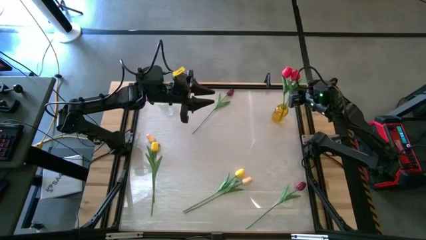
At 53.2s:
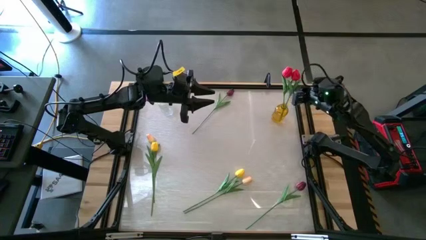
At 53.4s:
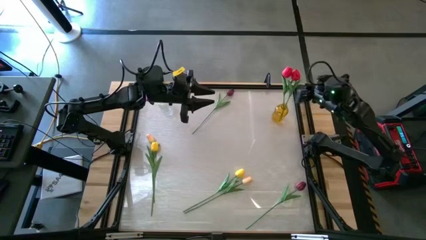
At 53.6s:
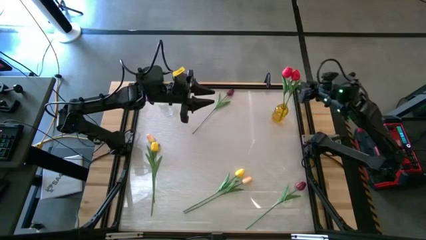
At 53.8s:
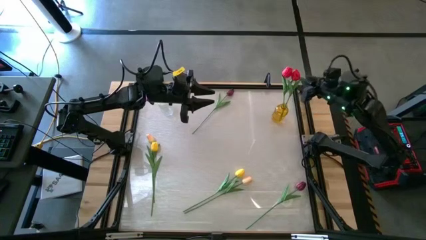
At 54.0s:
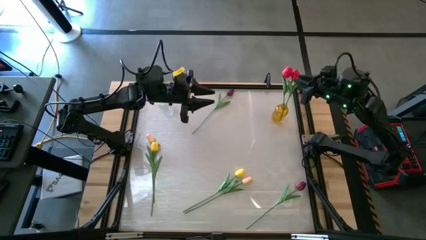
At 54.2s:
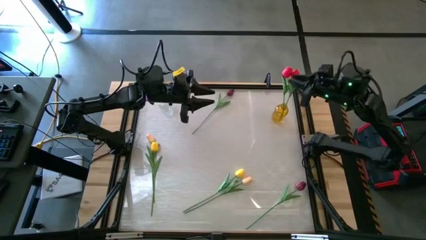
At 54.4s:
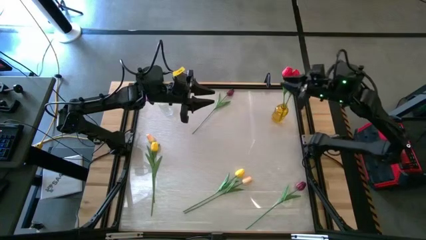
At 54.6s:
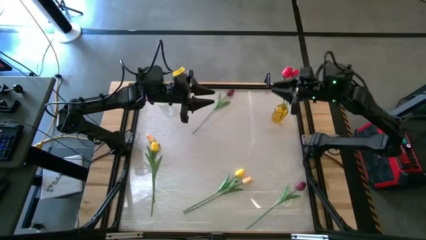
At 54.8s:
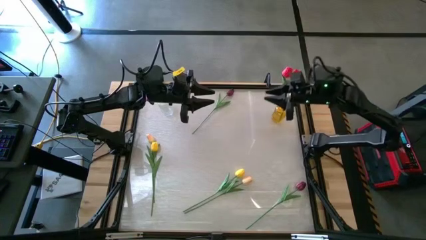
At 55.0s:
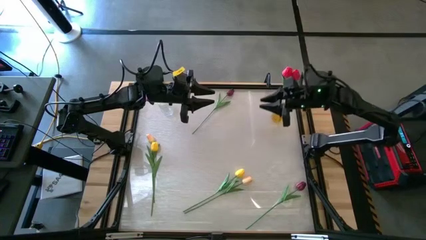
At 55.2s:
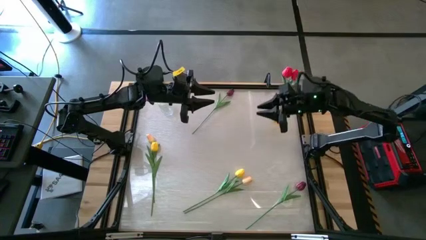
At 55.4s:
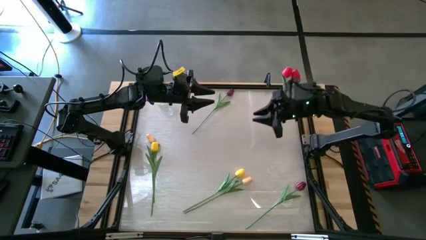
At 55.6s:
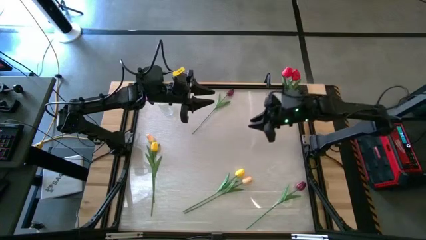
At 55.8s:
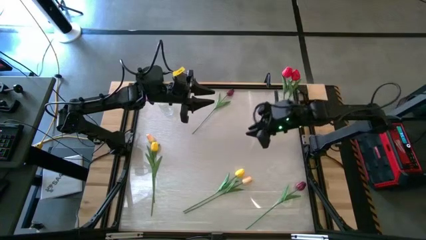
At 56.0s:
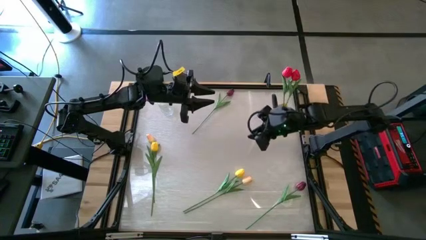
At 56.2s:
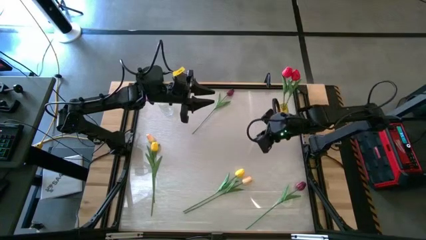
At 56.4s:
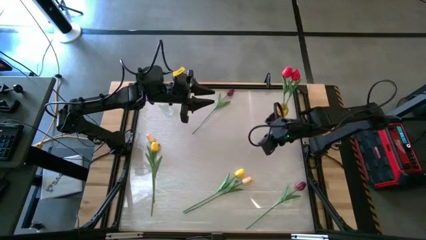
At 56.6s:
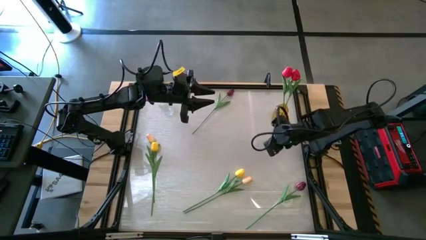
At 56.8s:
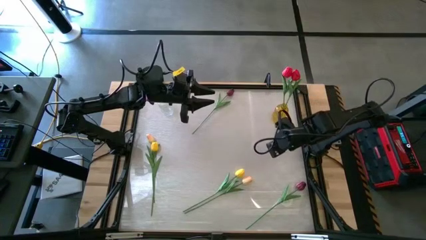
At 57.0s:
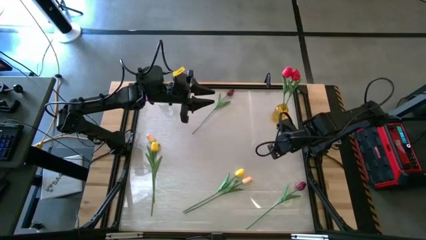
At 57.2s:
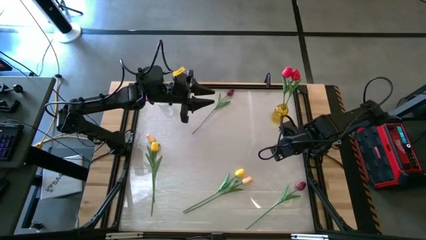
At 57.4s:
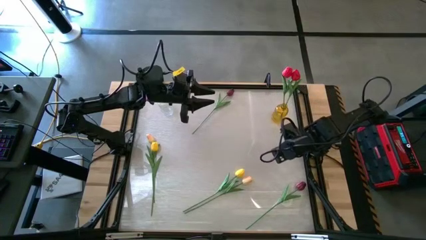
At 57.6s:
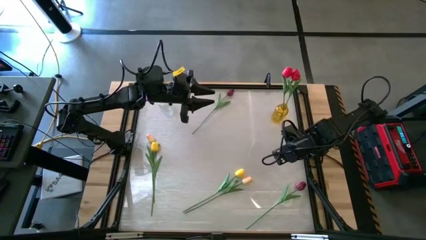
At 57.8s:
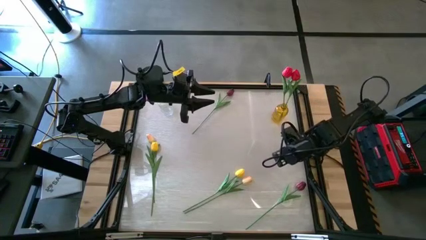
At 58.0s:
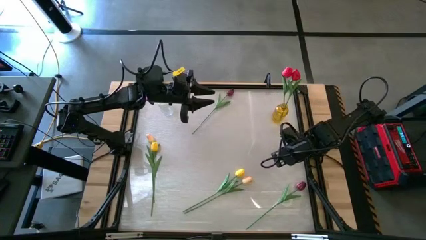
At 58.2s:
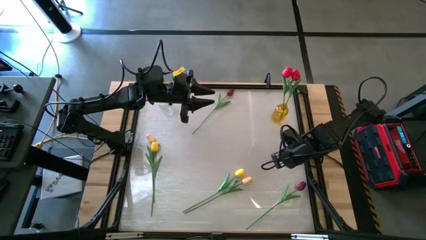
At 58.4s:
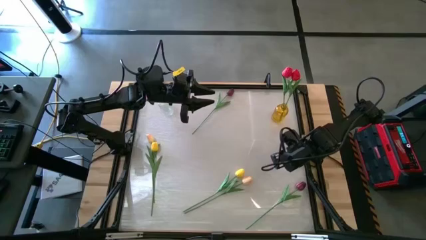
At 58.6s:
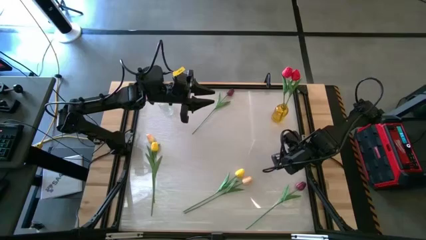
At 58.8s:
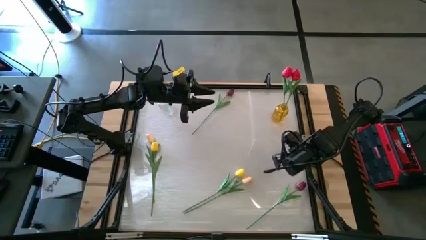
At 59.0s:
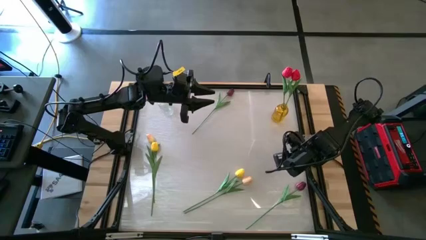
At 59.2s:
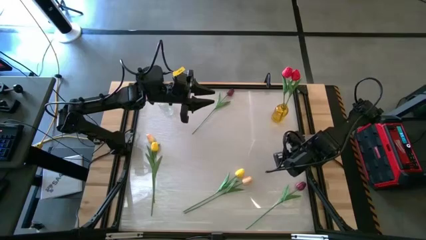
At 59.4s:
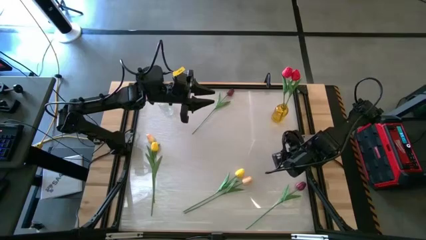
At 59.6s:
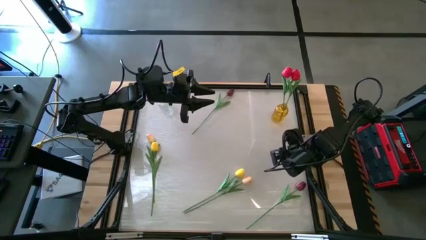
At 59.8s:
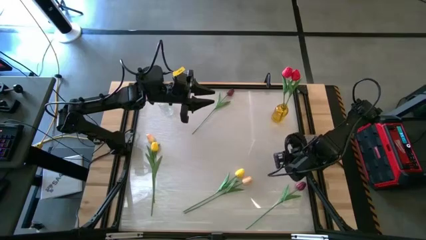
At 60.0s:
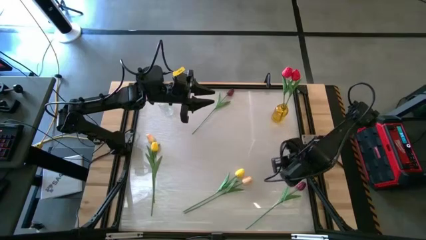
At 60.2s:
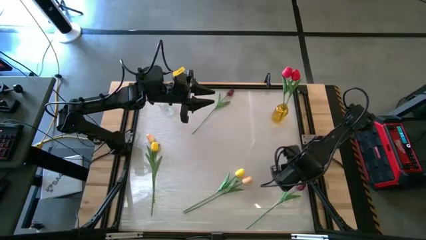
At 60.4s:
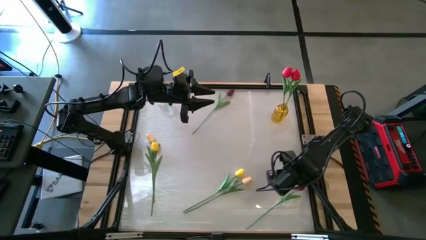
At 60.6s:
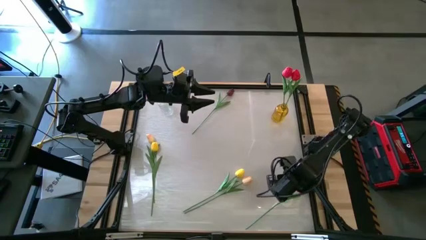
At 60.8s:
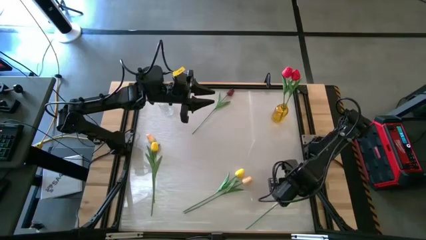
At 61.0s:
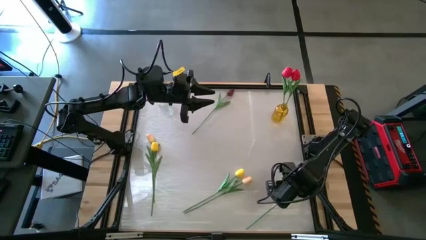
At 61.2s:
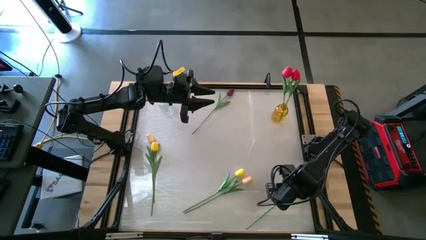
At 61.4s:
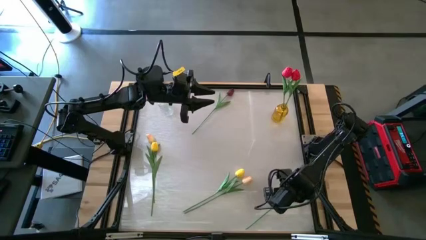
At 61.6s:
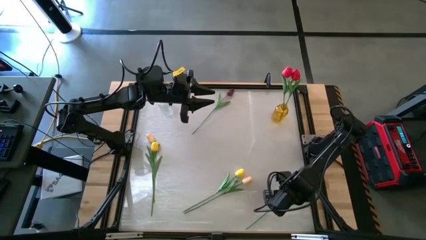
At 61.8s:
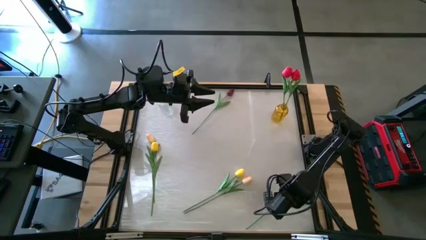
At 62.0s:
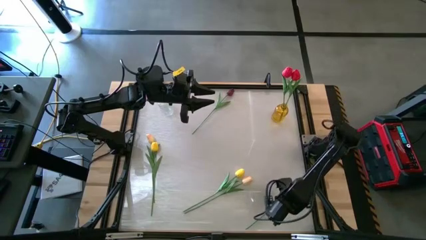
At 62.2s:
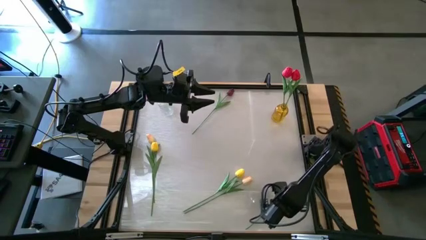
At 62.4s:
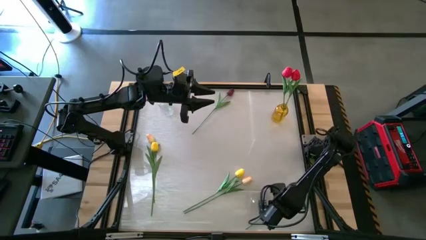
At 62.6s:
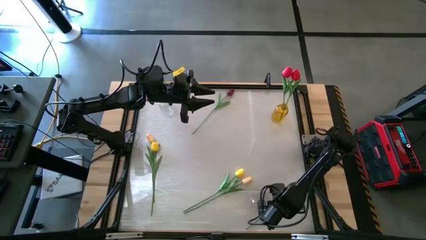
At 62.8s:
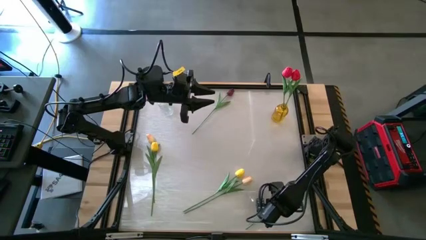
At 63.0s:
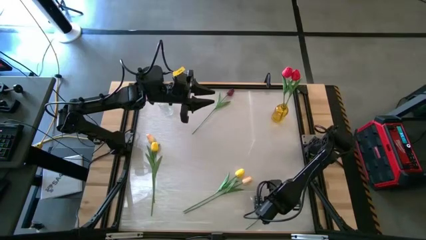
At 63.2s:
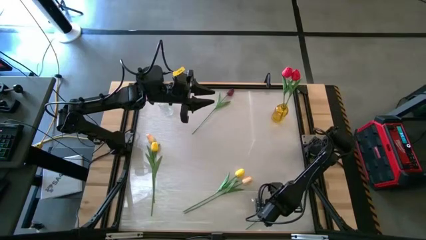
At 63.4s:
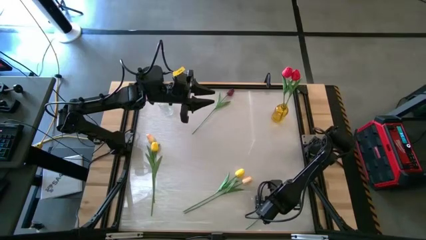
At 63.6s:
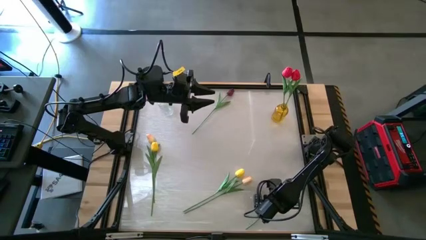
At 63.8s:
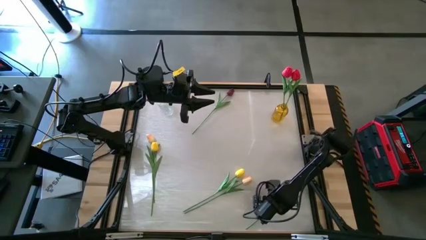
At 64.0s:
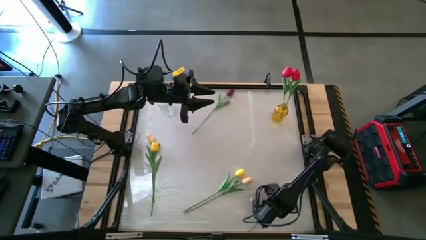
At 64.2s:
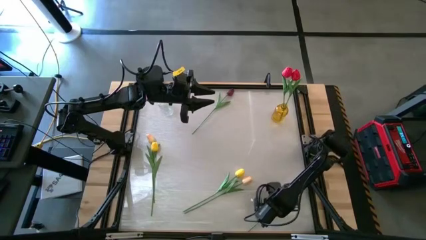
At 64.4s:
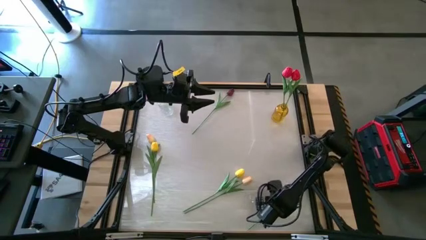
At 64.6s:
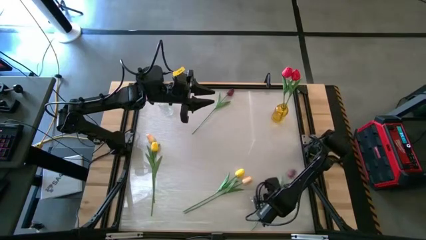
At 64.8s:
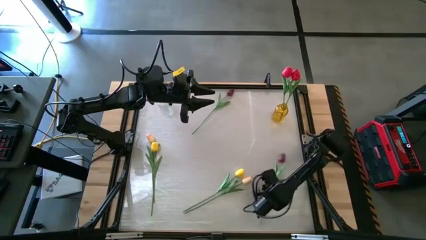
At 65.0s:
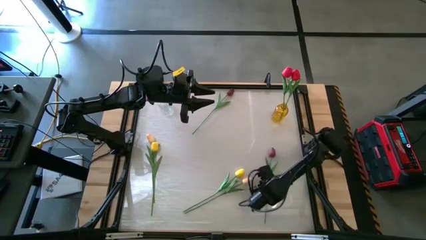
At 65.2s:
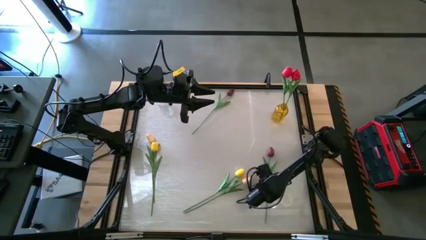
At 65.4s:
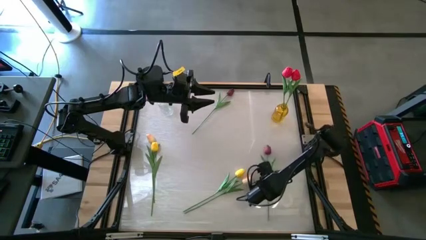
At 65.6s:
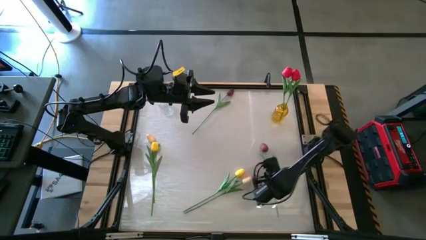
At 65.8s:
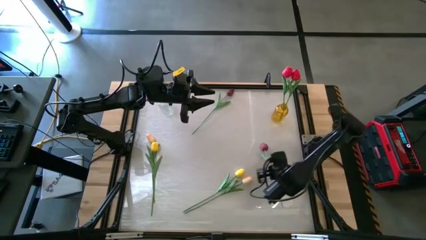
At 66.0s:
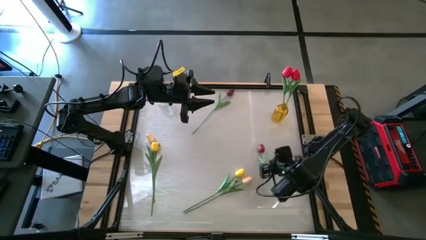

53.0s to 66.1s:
Task: Sort flowers into vase by color
Put the bottom dark red tulip into the yellow vase

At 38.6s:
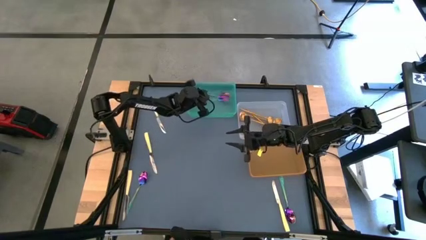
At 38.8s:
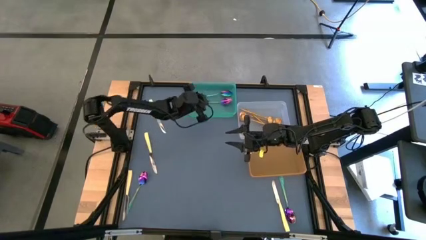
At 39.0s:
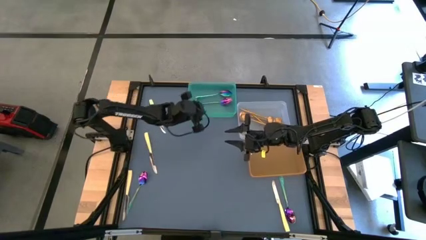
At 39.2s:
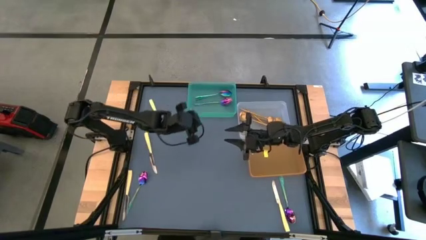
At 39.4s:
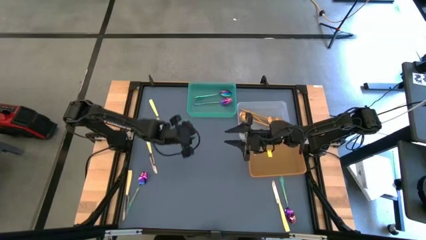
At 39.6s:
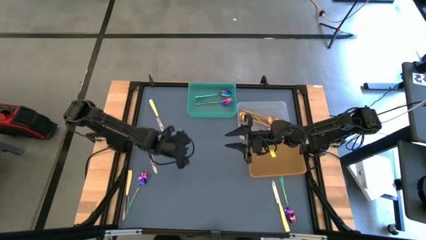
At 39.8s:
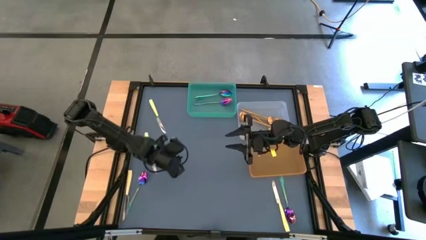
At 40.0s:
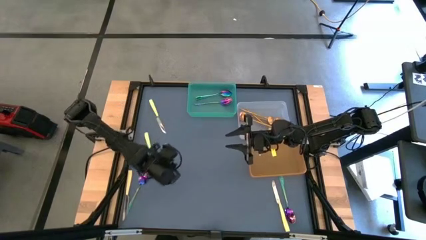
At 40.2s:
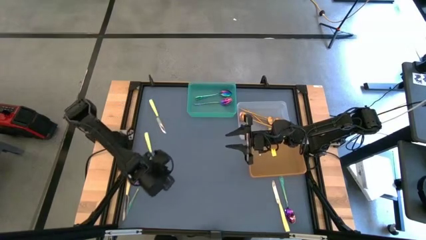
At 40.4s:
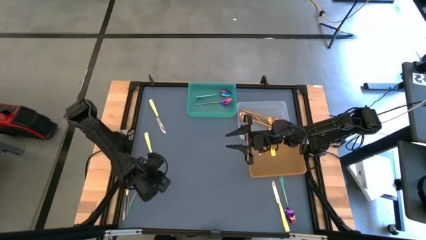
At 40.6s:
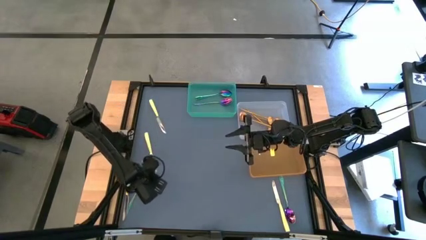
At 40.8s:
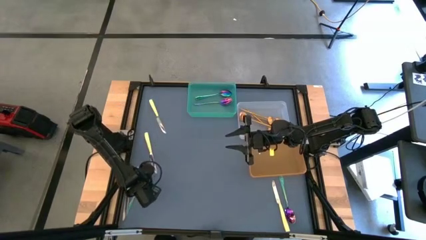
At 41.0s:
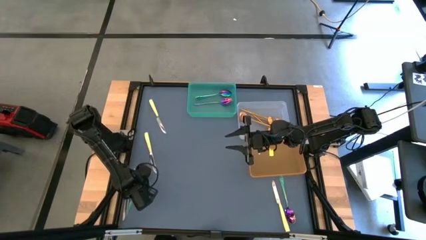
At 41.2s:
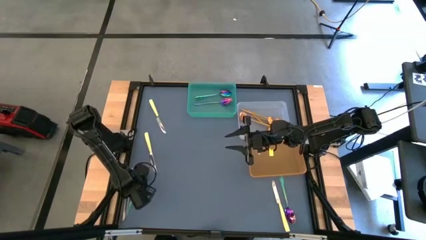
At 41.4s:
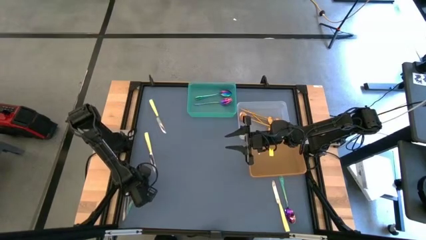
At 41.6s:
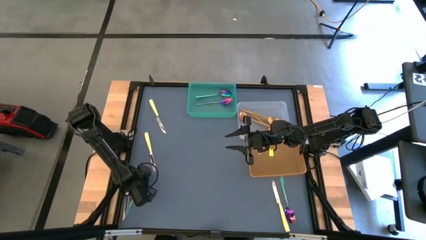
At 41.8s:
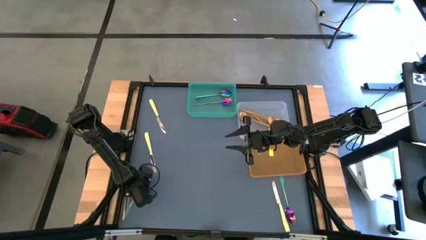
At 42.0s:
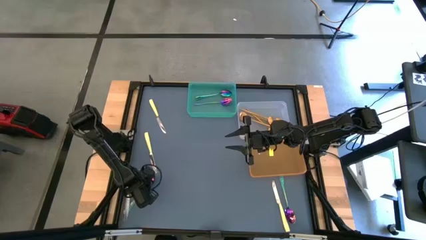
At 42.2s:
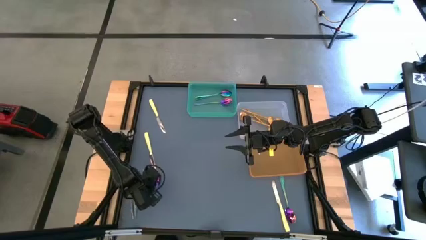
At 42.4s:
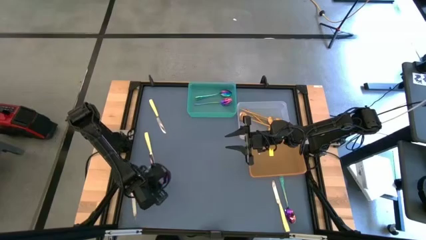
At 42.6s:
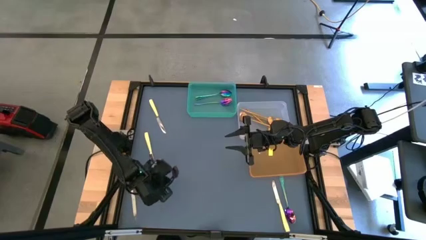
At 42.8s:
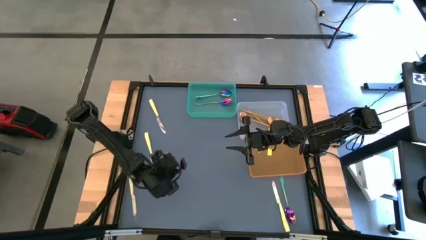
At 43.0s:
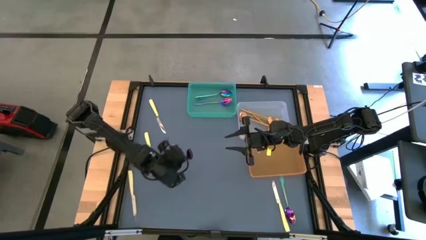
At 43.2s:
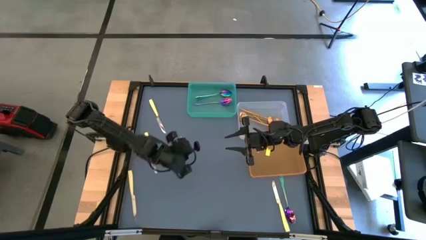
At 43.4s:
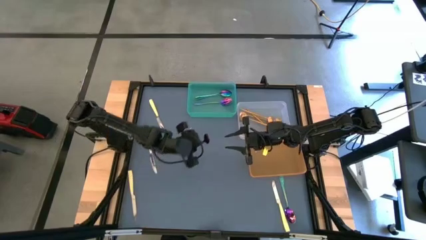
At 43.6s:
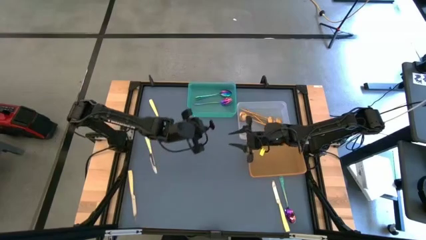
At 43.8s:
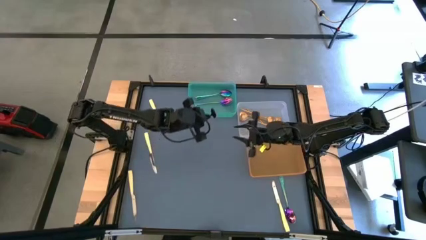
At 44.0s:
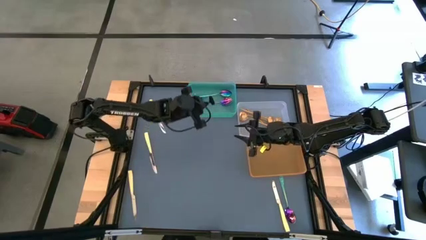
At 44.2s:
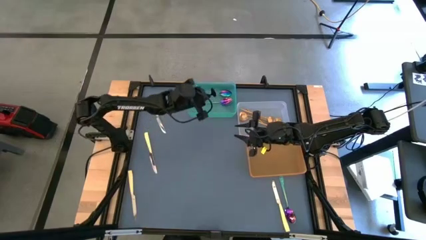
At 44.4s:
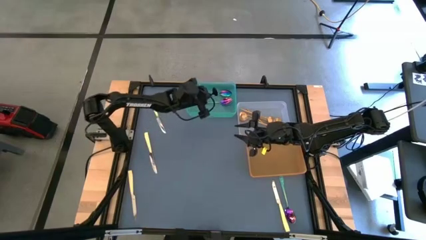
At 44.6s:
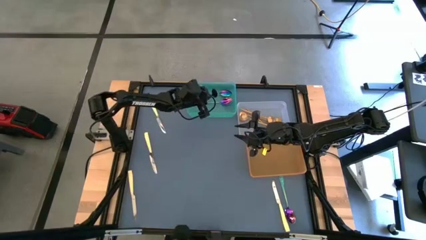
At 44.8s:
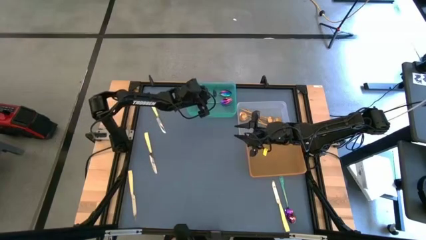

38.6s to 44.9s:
Task: Sort silverware by color (type)
Put the purple spoon into the green bin
